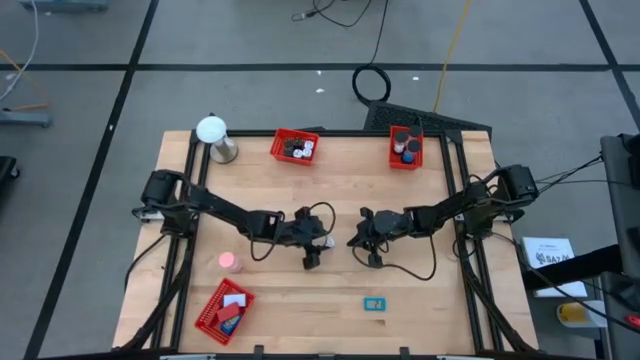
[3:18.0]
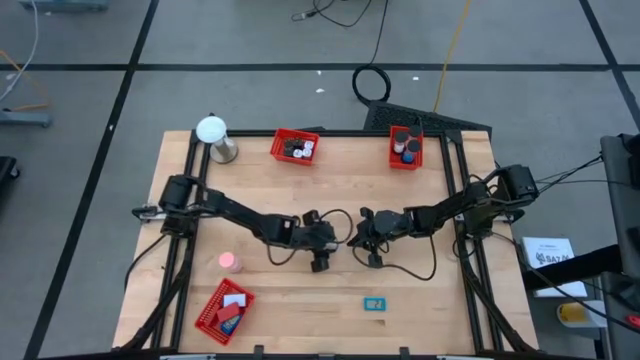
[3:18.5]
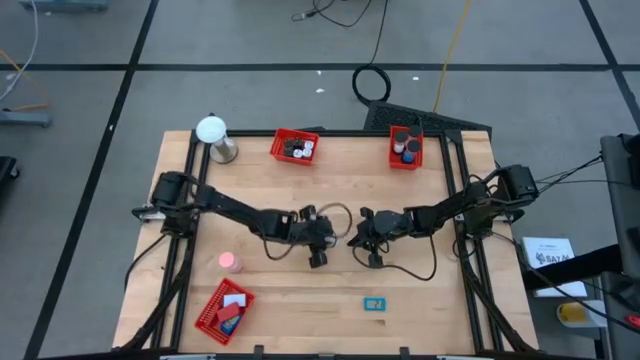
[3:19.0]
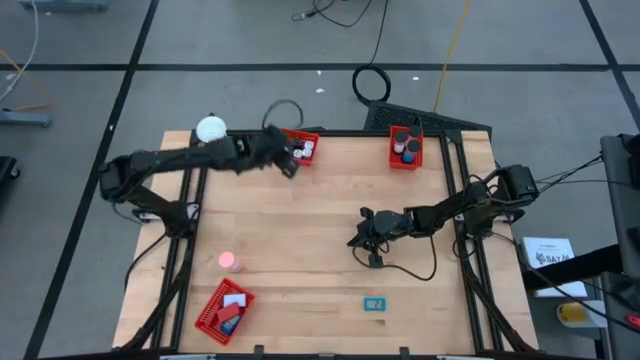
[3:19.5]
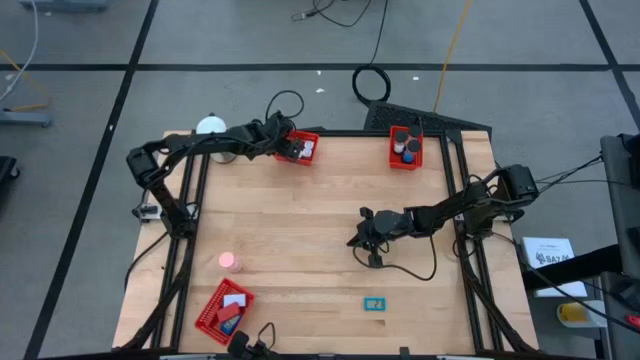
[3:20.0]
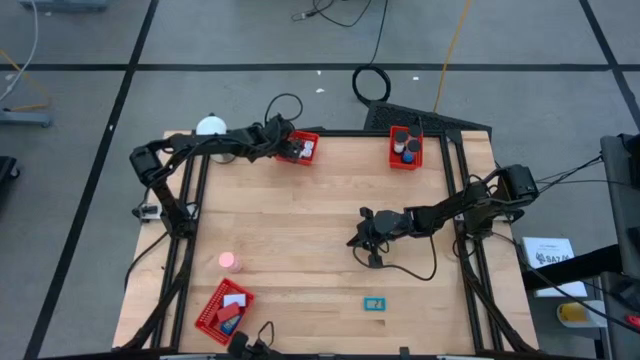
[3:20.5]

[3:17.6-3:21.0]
Task: Pick & Place Office items
Put the pink charger adapter into the top left red basket

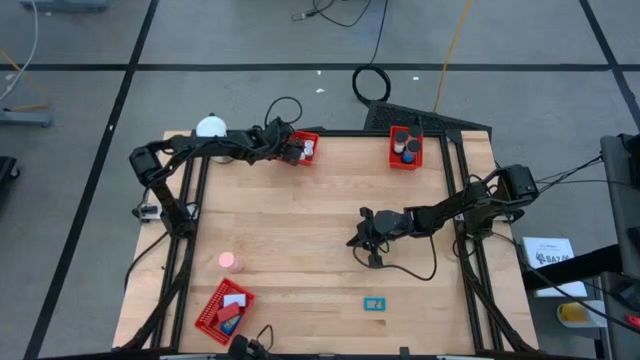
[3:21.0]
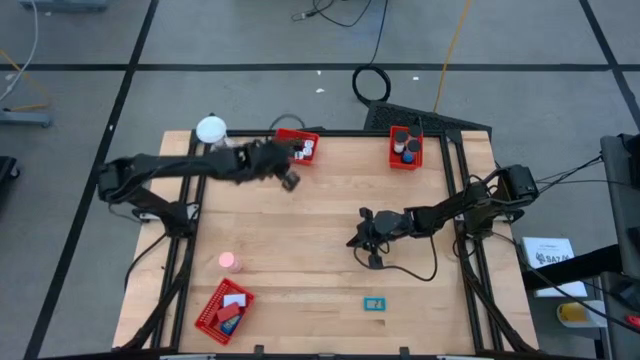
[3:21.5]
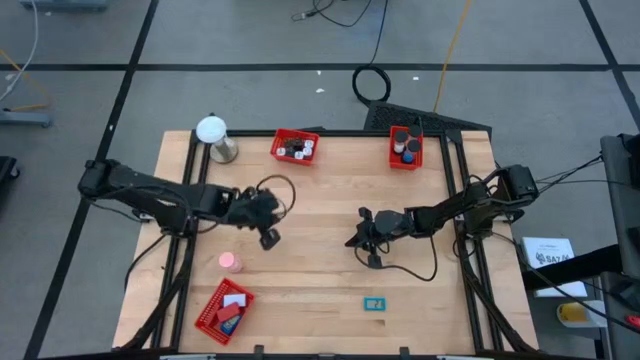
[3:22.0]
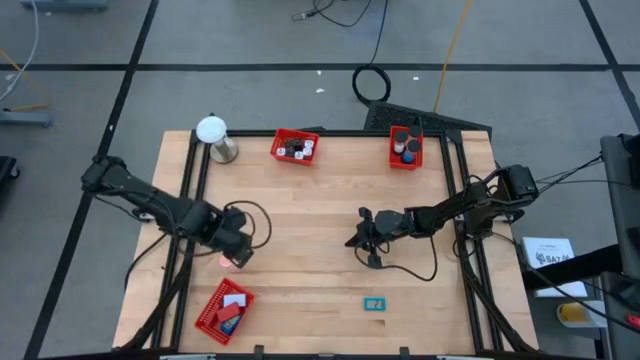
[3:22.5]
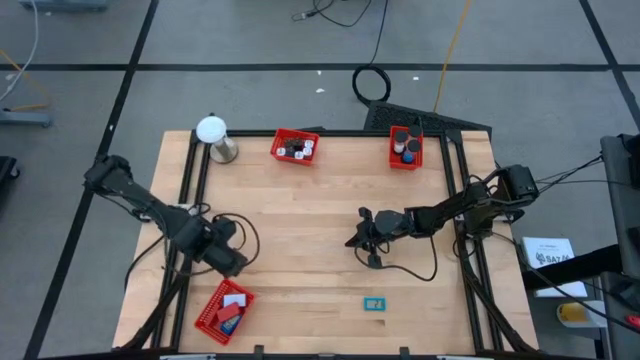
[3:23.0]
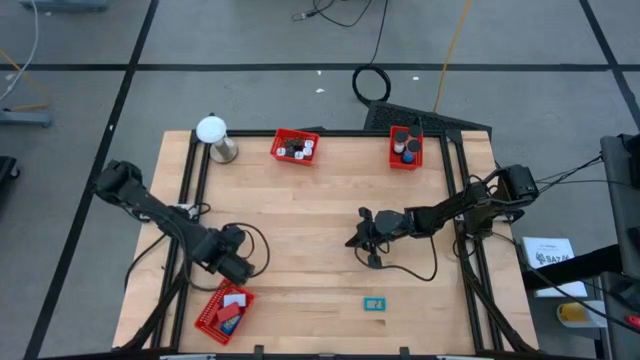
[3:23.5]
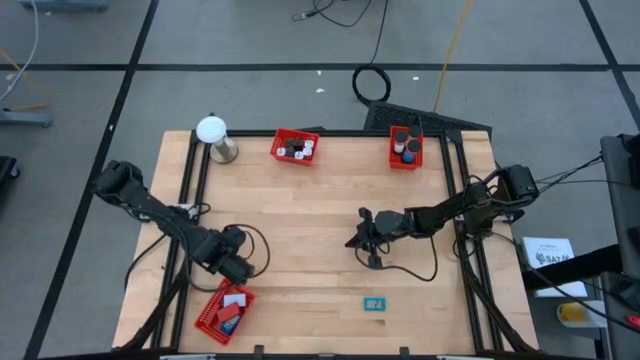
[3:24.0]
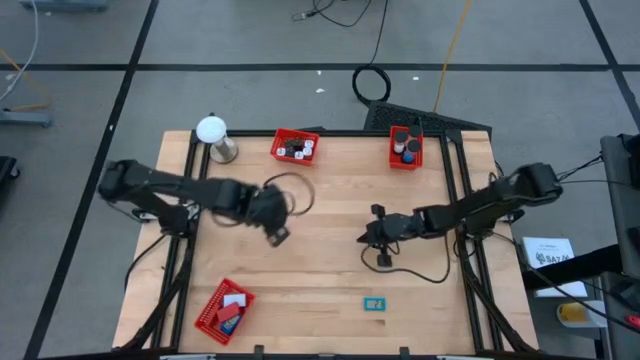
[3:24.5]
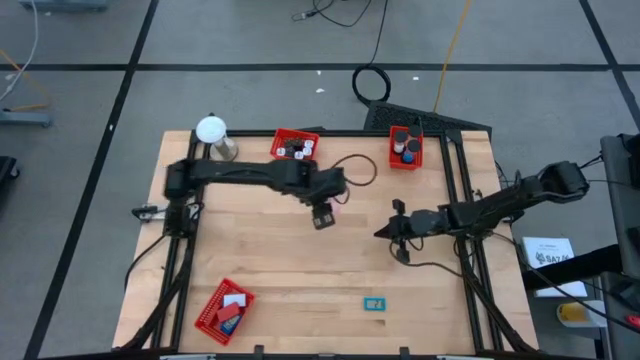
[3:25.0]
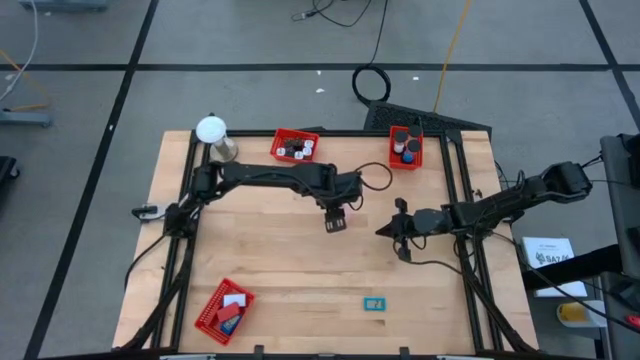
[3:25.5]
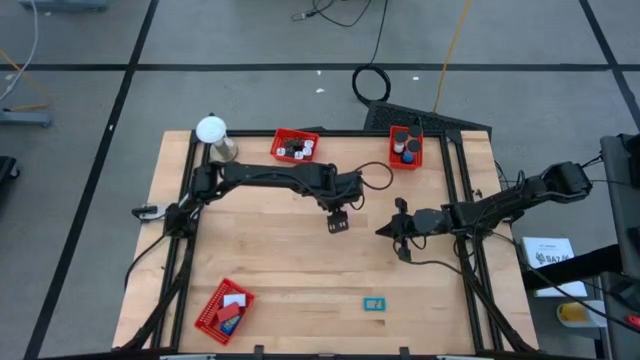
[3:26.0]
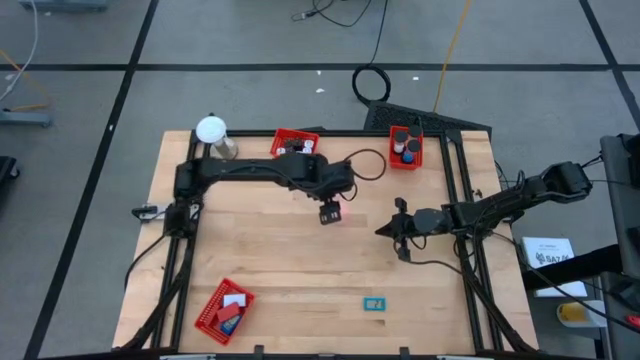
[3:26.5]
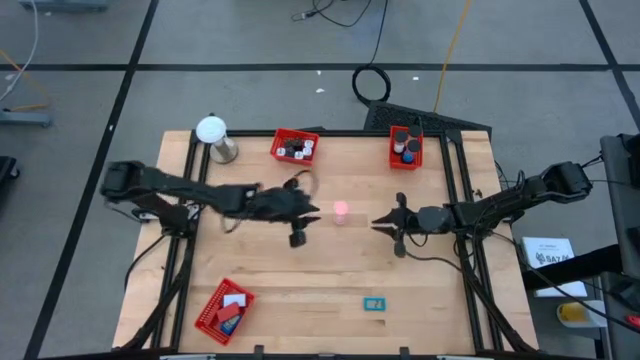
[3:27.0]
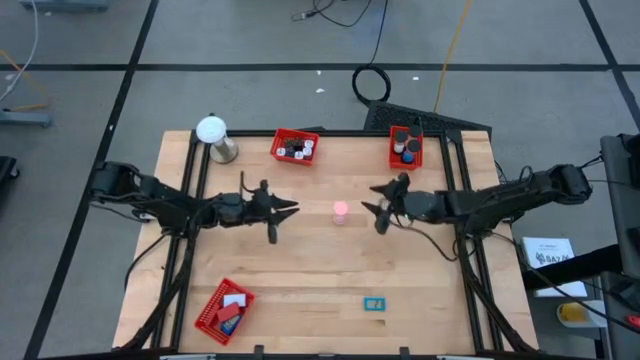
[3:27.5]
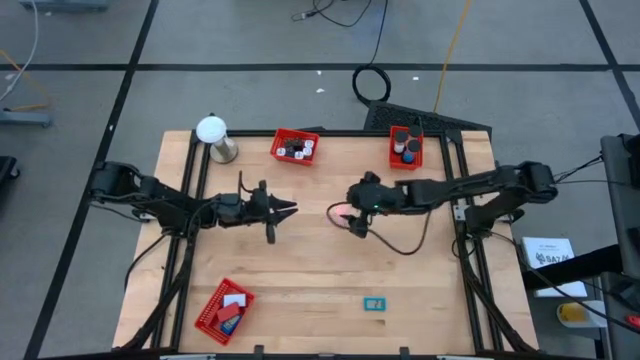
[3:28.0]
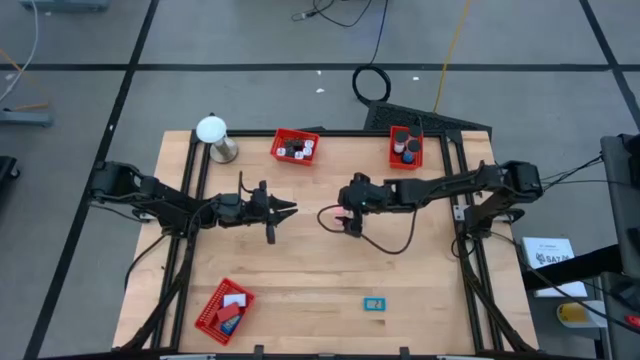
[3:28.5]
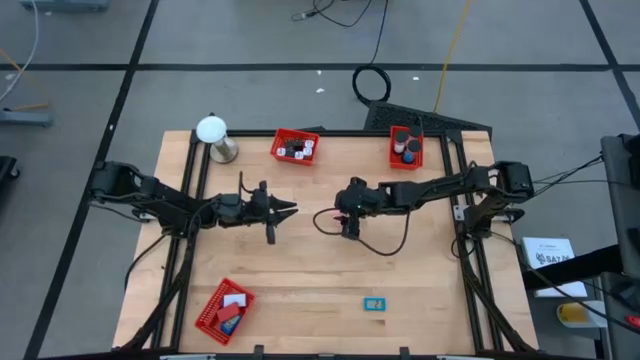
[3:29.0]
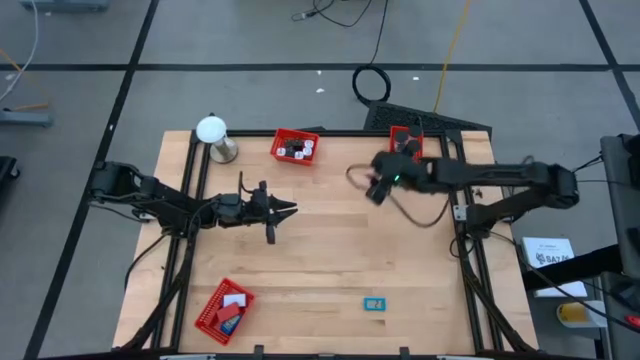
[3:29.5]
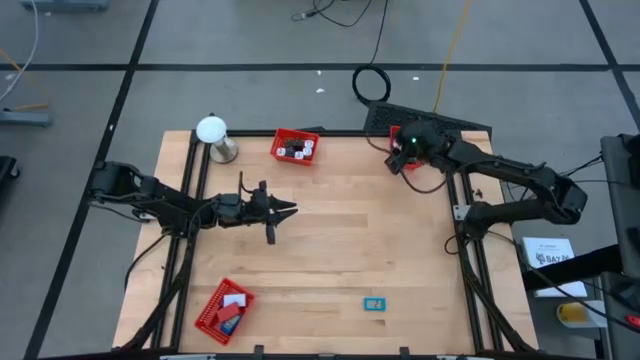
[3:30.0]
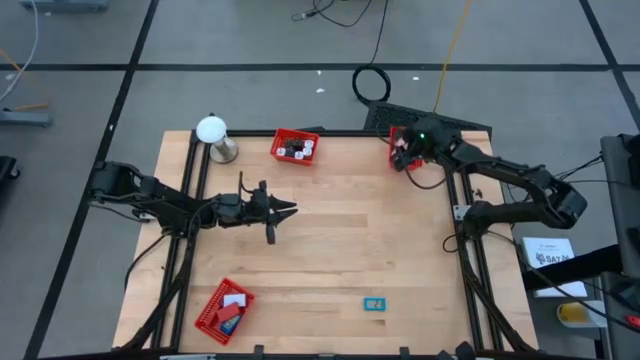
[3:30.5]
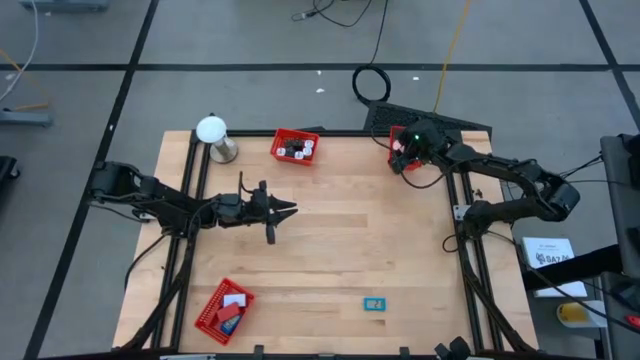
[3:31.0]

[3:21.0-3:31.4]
Put the pink hourglass into the top right red basket

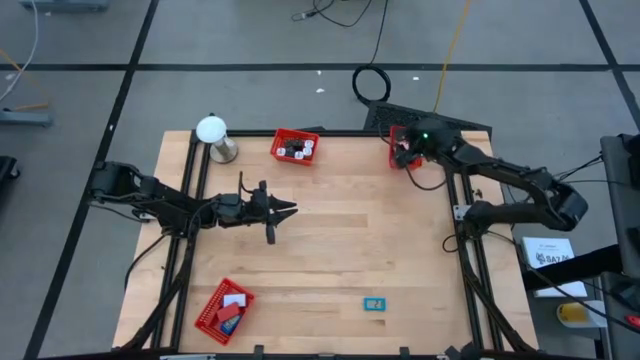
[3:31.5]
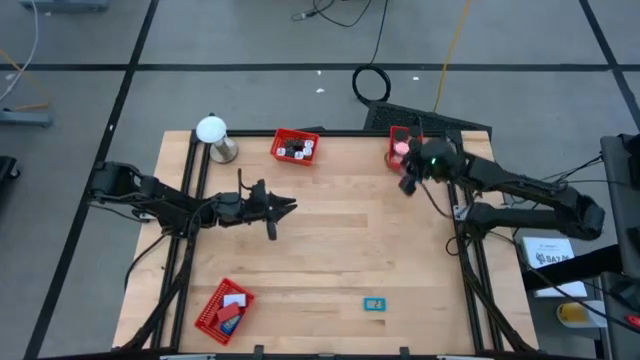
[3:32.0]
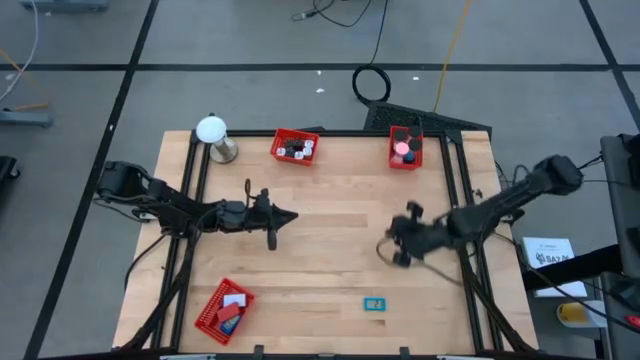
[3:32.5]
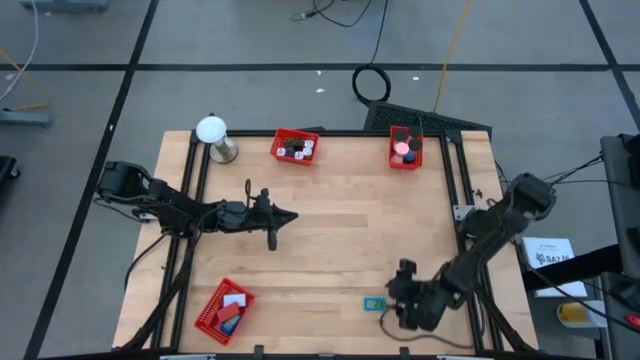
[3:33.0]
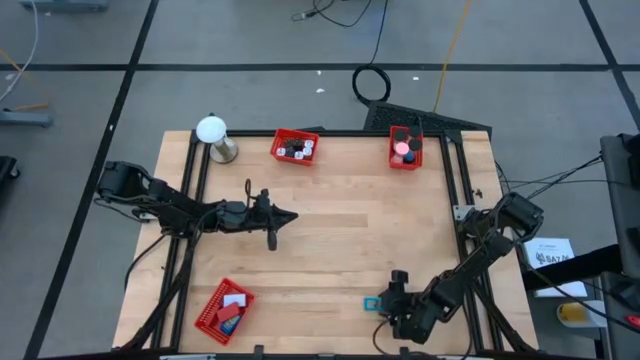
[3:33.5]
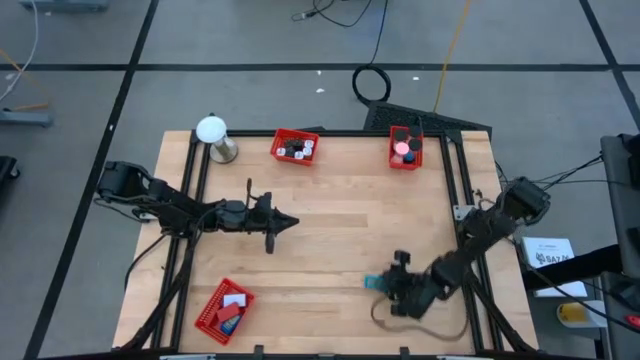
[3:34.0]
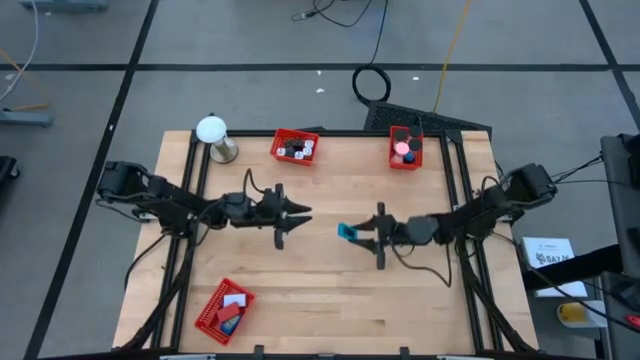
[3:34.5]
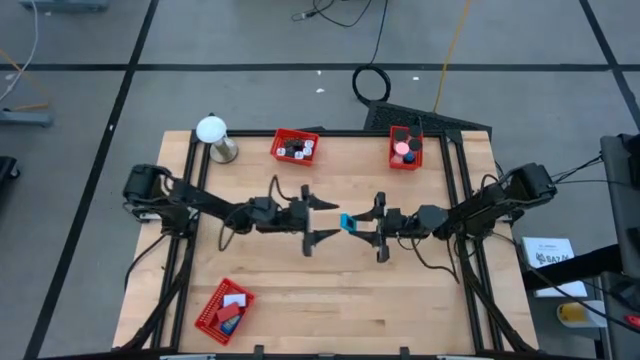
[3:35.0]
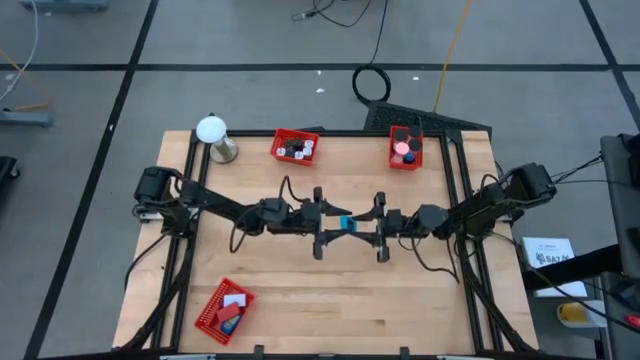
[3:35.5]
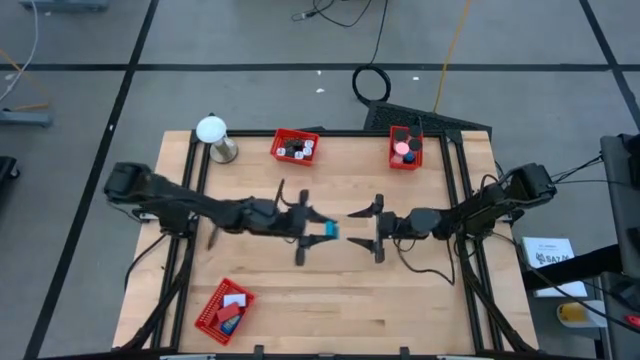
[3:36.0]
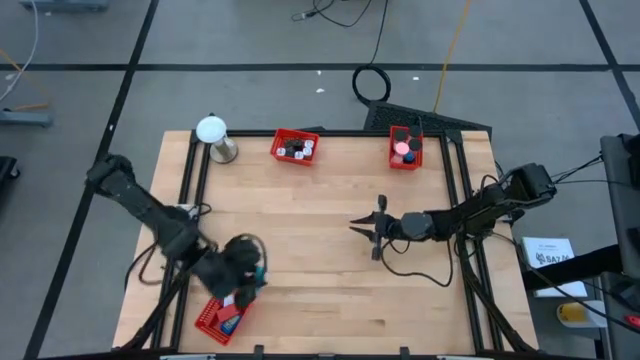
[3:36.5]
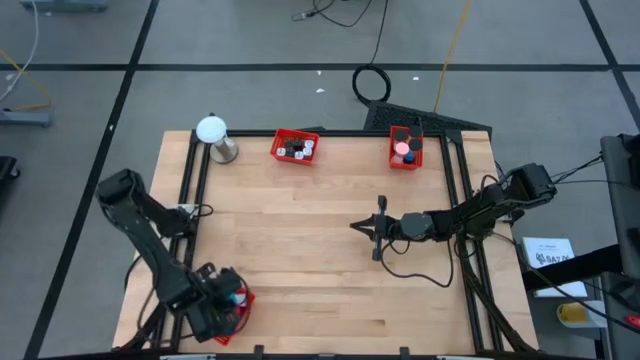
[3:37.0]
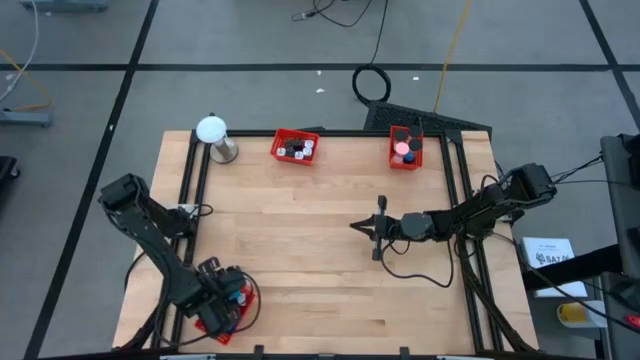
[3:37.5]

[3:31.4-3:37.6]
Put the blue timer into the bottom red basket

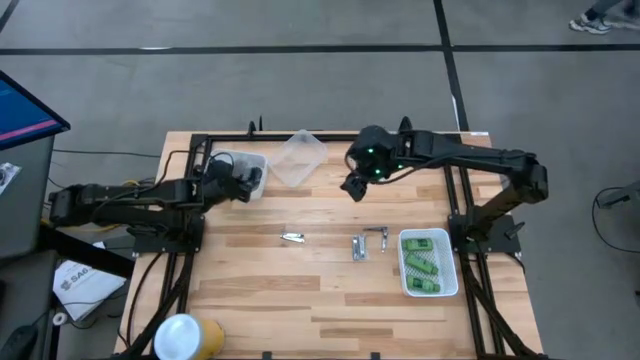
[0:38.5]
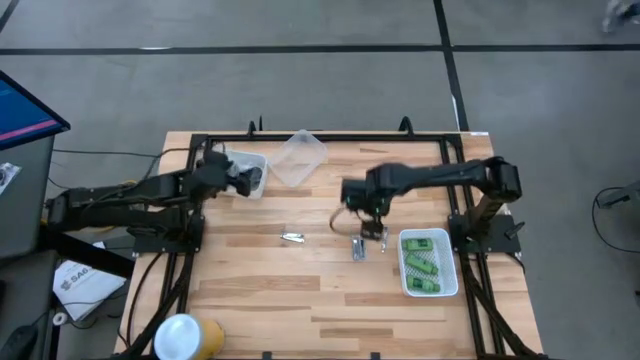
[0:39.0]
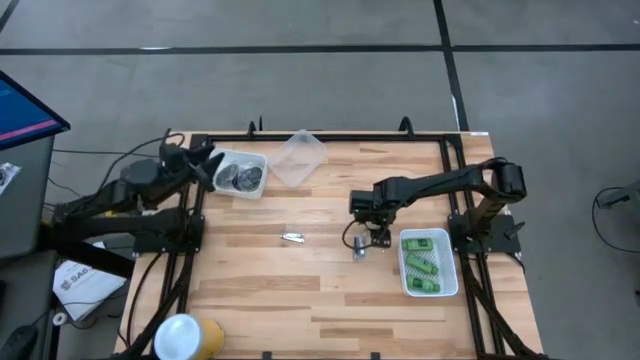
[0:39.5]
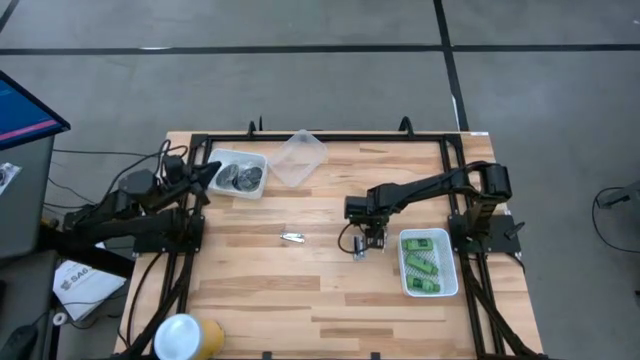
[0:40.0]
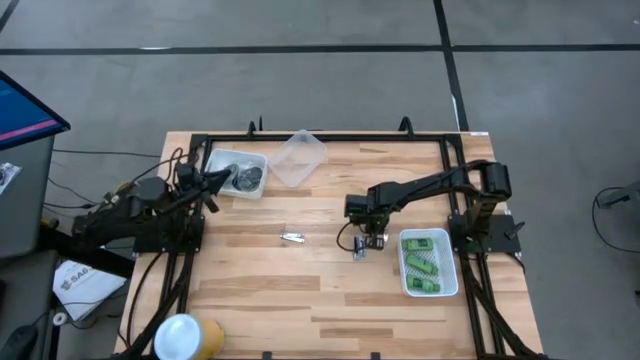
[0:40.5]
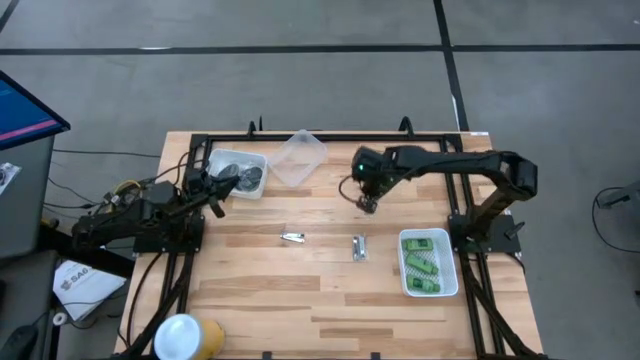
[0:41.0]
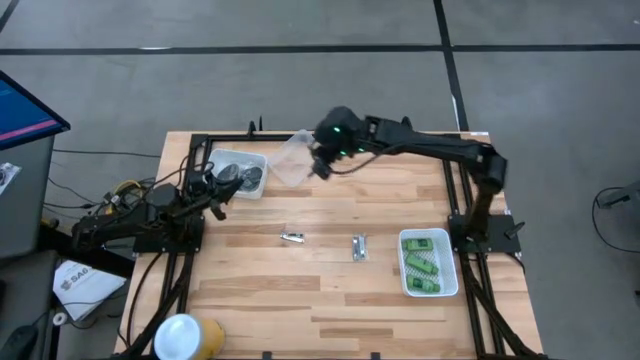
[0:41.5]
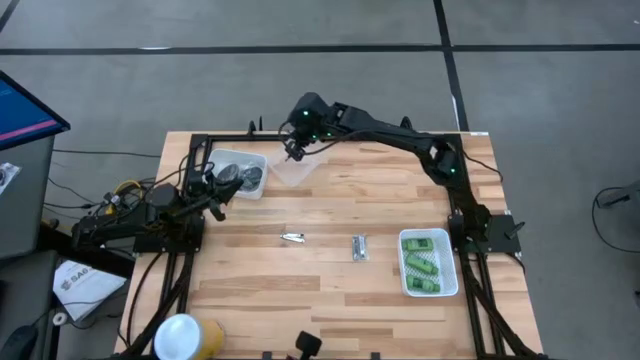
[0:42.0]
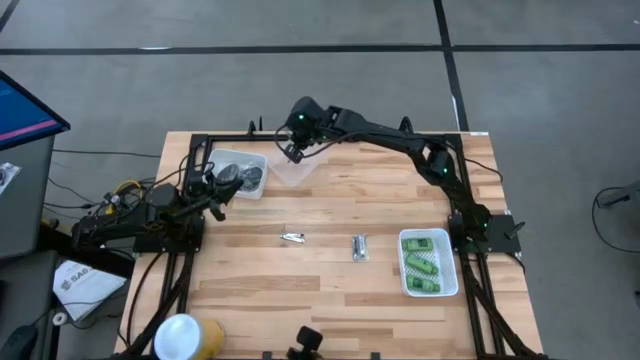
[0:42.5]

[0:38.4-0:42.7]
Task: Pick & Place Travel size toiletries
Put the silver nail cutter into the transparent bin
